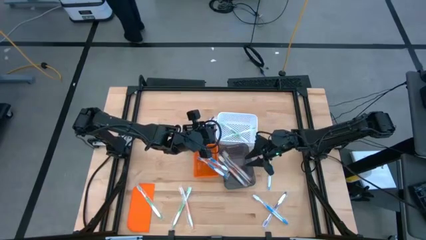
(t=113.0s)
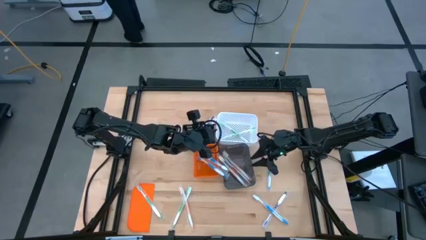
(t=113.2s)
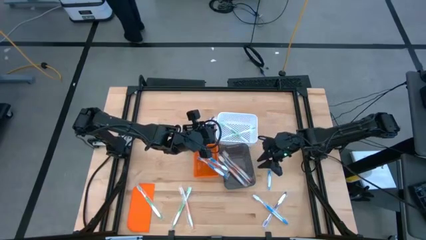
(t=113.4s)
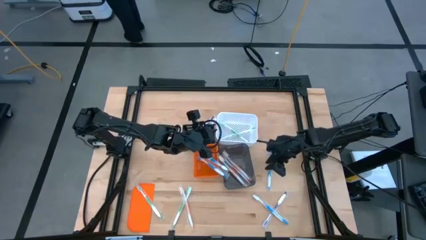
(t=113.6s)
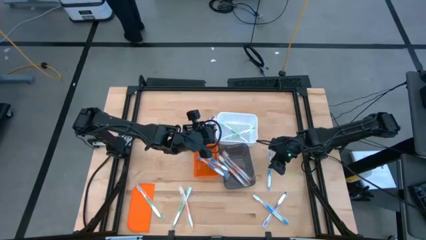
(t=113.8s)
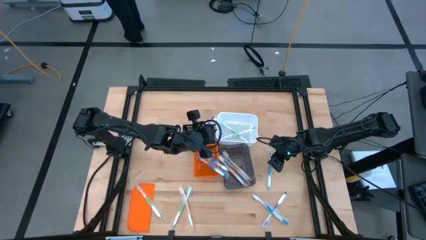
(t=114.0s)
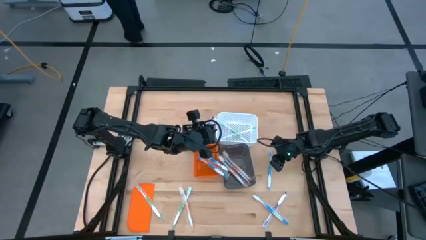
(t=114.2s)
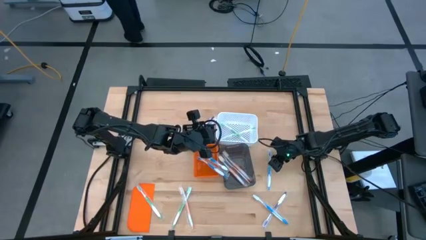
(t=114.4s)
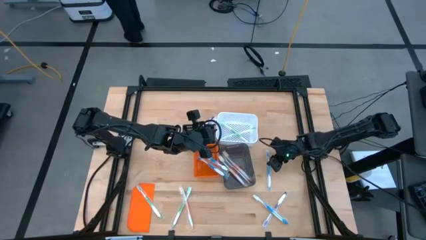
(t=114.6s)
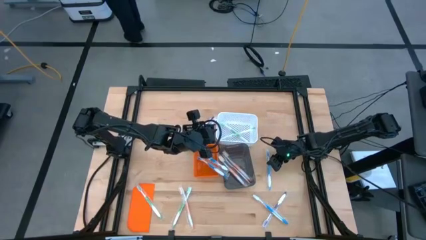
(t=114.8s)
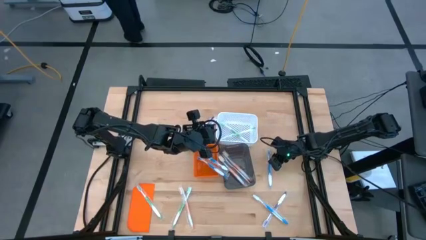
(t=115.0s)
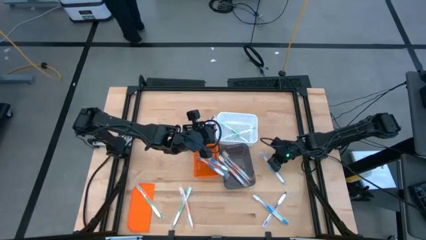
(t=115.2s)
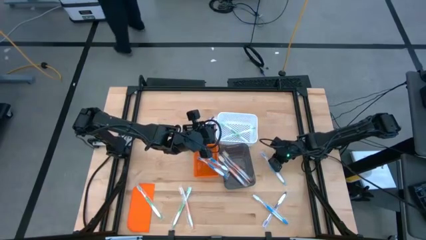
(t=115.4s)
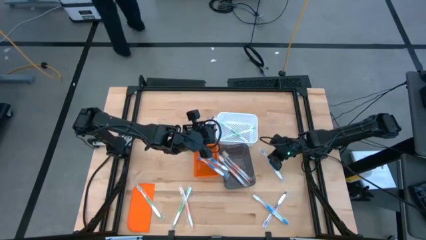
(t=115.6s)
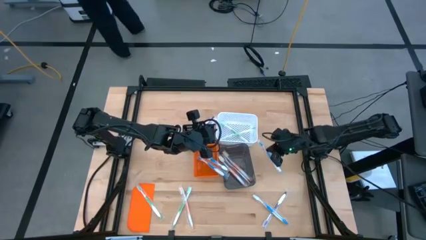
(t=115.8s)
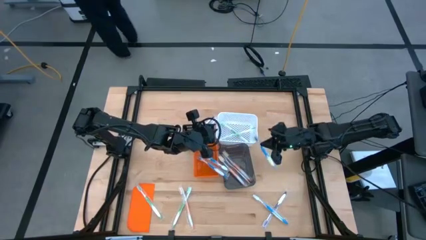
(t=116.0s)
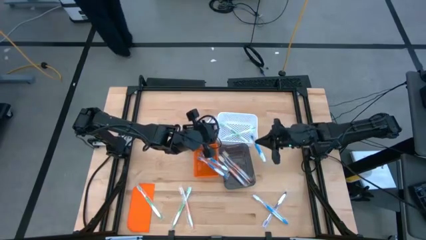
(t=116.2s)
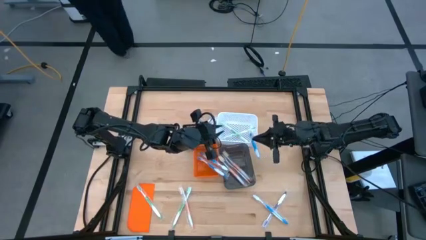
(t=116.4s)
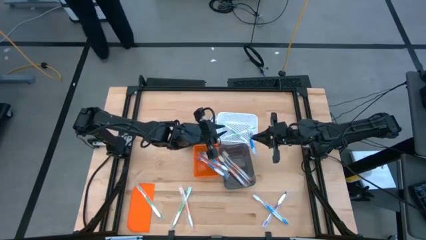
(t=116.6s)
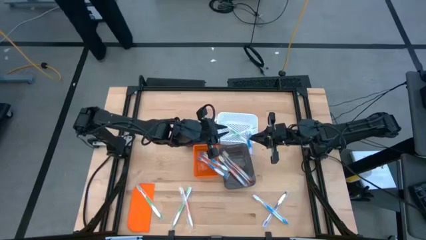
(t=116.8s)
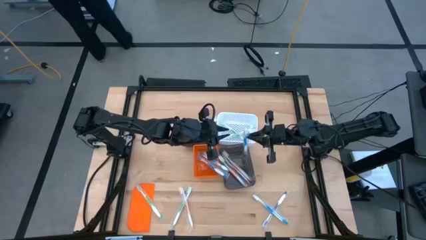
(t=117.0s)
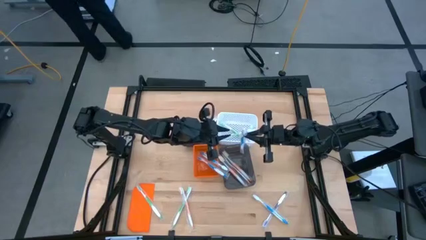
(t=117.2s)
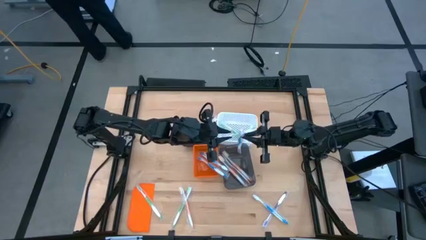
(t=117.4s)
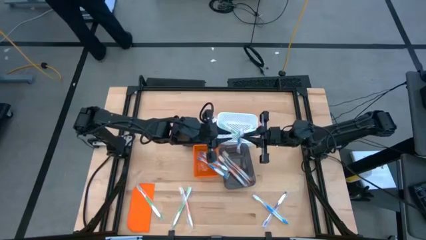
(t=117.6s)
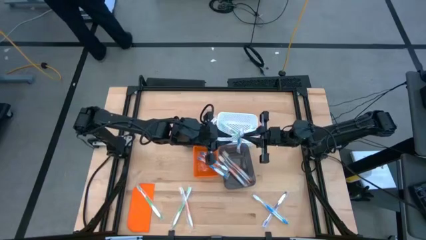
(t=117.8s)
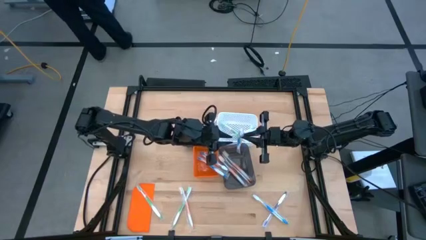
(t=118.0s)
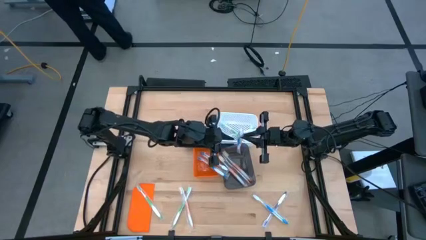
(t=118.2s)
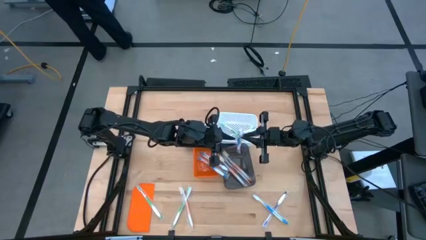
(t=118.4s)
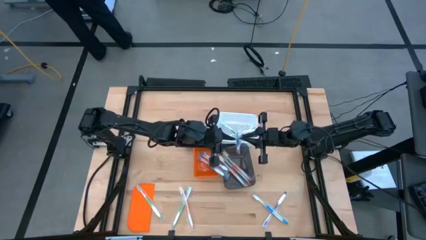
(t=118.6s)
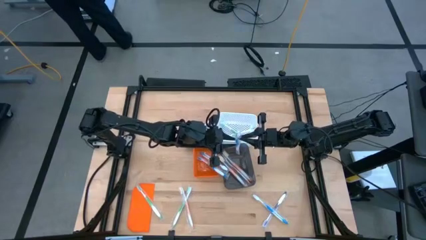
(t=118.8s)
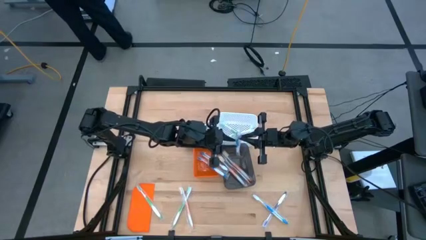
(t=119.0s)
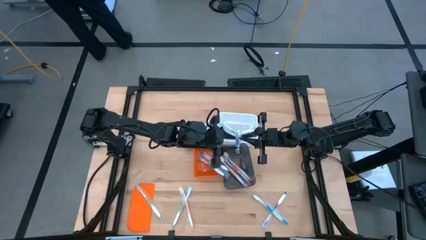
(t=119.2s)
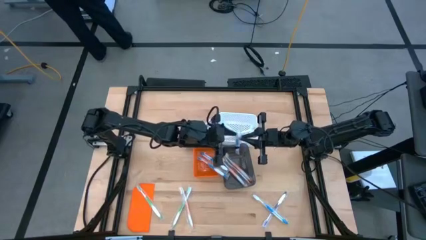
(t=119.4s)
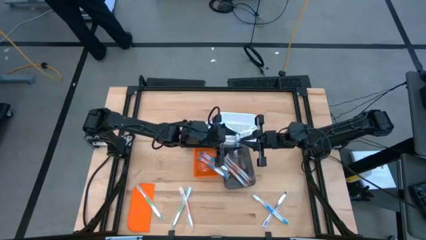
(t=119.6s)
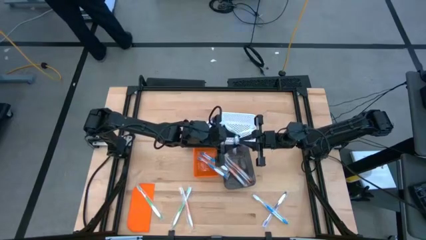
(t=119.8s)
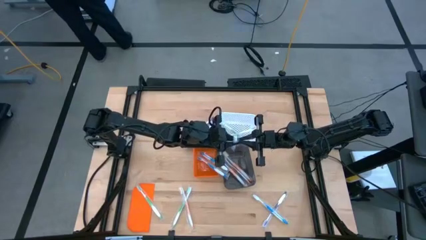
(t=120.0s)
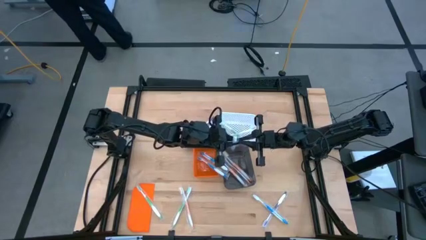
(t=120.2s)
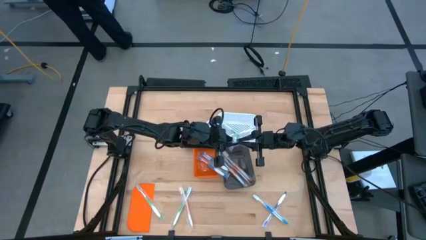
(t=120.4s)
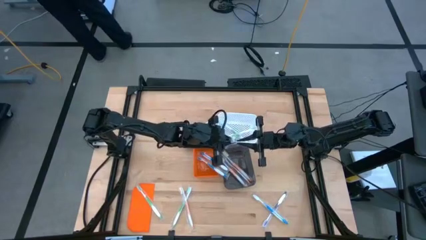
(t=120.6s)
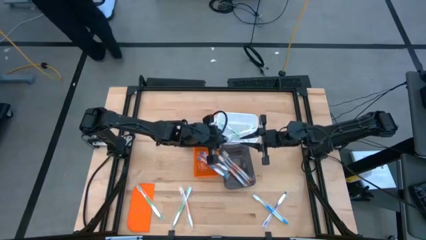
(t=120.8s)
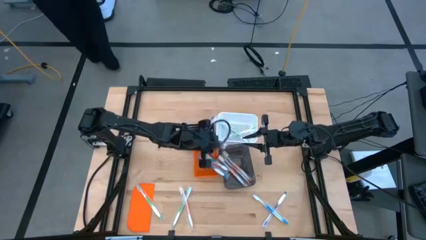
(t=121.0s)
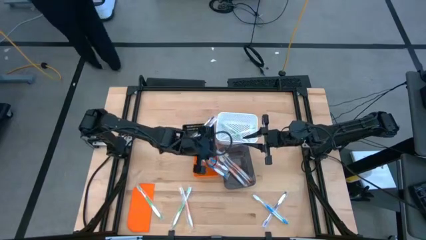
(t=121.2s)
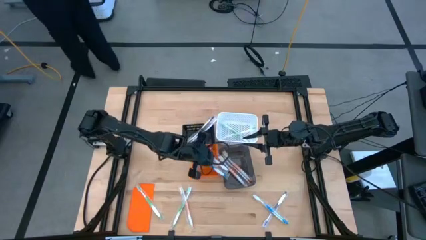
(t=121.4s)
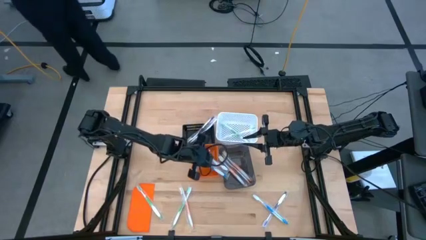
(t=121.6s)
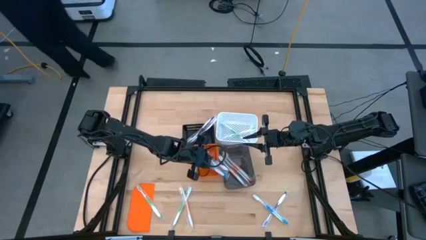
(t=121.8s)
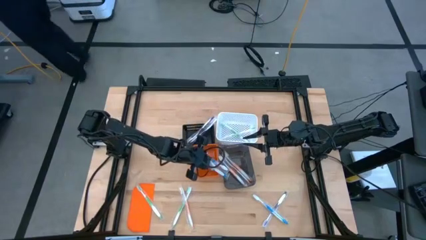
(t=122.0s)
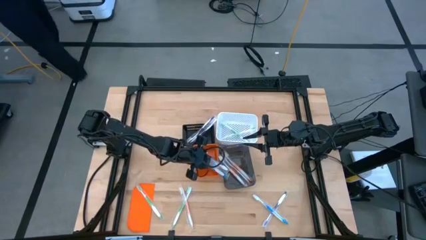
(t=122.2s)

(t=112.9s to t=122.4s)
Task: Pick & Place Toothbrushes
Put the blue toothbrush into the orange bin

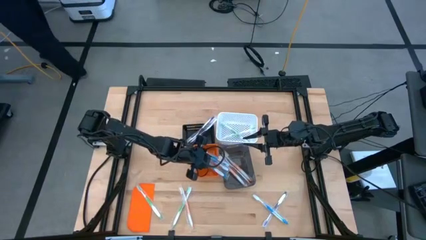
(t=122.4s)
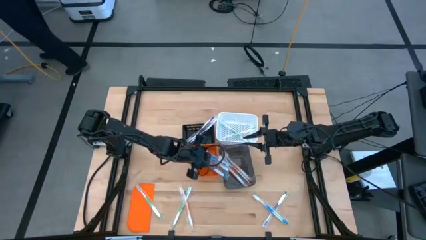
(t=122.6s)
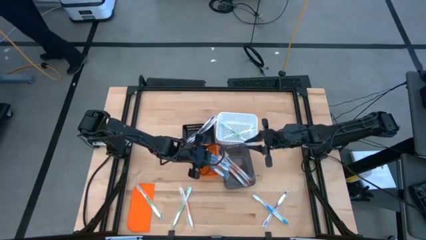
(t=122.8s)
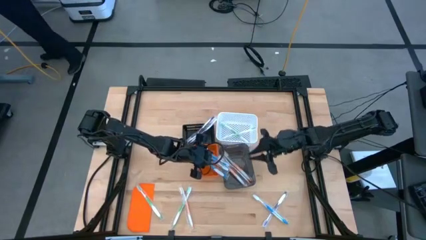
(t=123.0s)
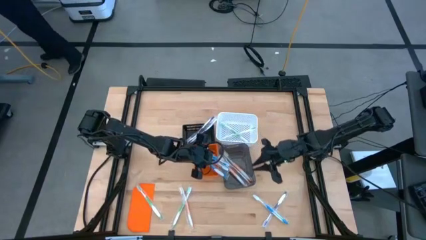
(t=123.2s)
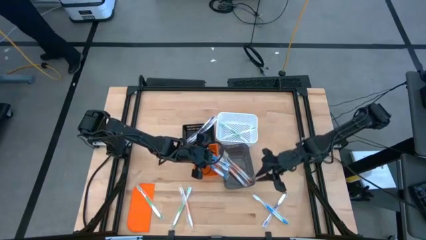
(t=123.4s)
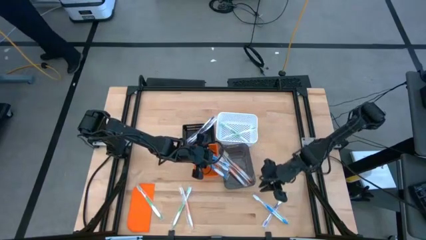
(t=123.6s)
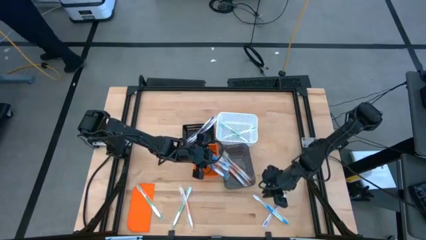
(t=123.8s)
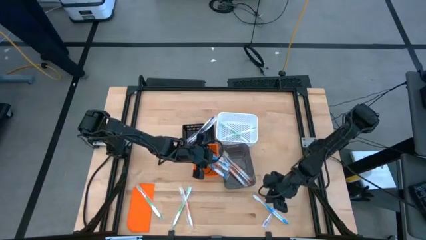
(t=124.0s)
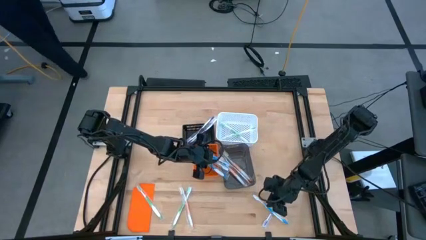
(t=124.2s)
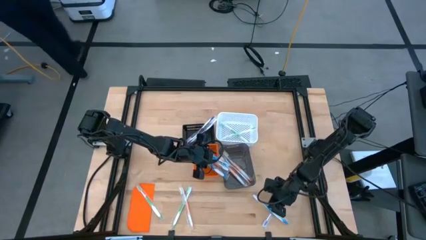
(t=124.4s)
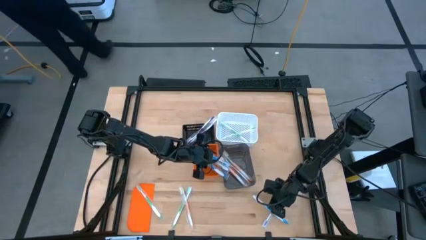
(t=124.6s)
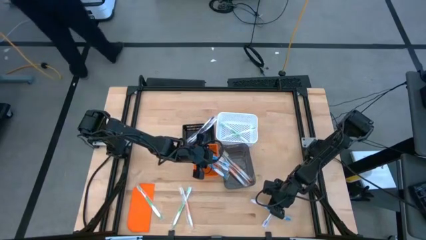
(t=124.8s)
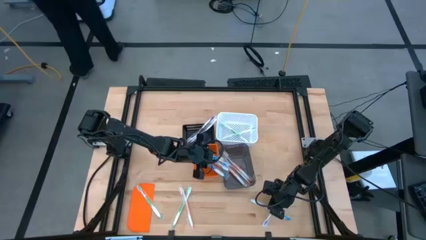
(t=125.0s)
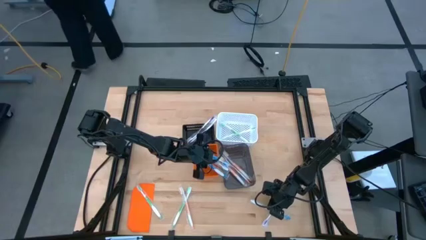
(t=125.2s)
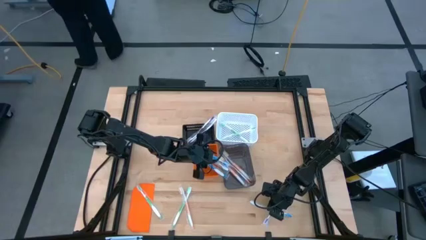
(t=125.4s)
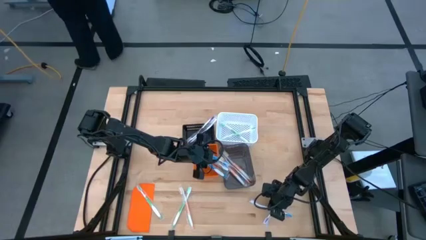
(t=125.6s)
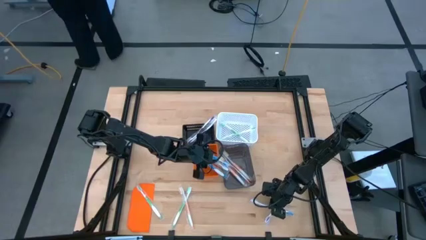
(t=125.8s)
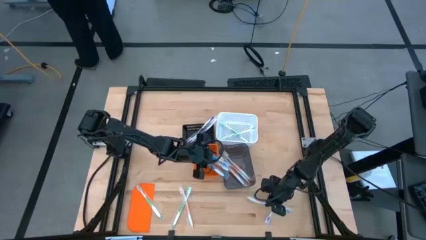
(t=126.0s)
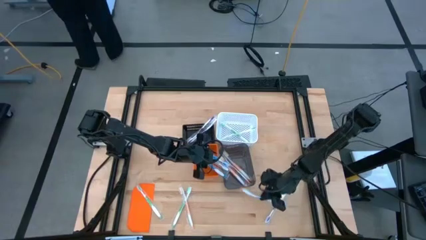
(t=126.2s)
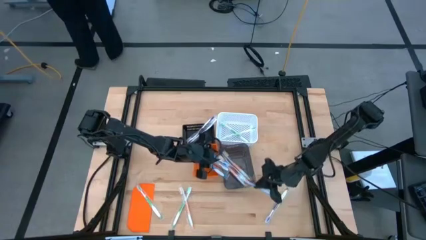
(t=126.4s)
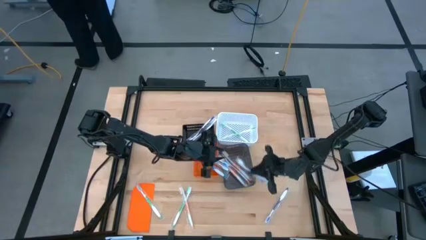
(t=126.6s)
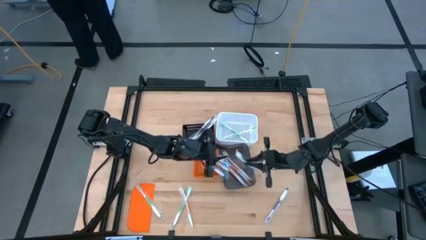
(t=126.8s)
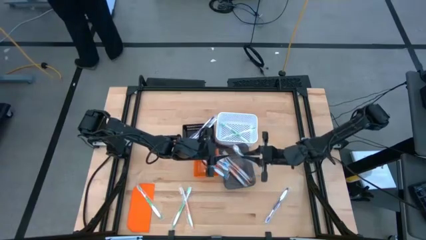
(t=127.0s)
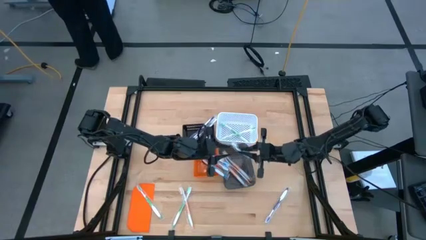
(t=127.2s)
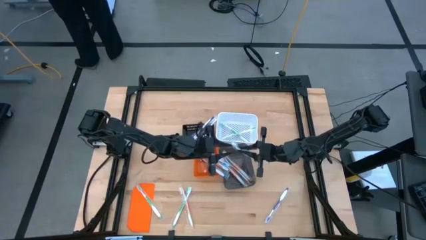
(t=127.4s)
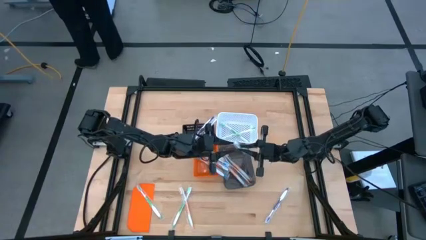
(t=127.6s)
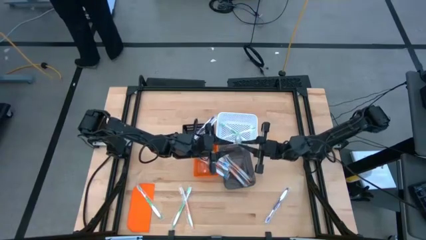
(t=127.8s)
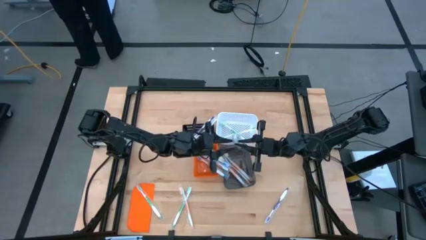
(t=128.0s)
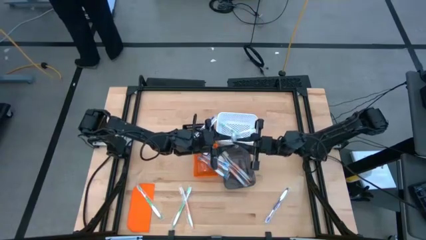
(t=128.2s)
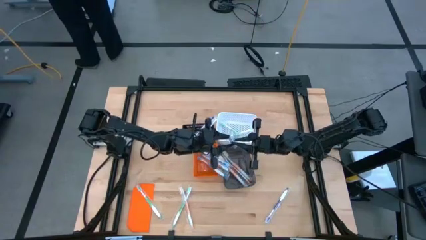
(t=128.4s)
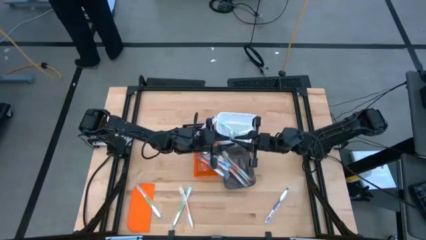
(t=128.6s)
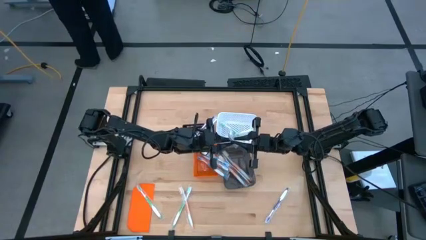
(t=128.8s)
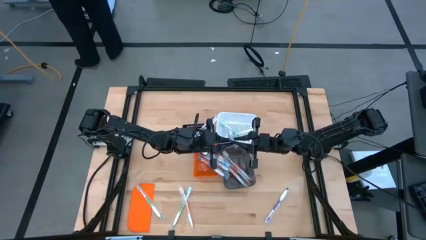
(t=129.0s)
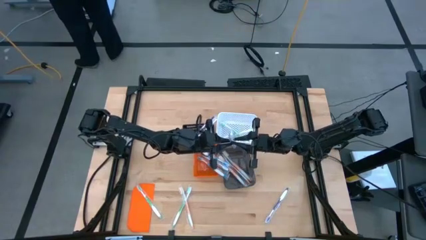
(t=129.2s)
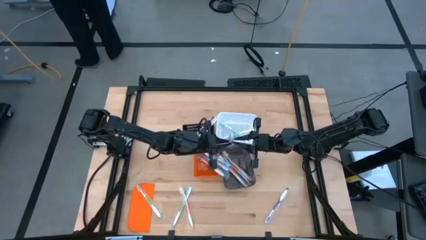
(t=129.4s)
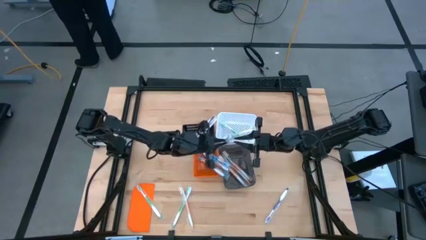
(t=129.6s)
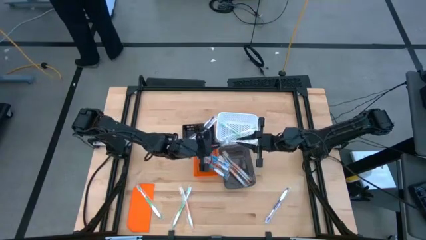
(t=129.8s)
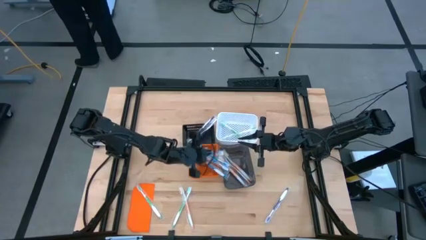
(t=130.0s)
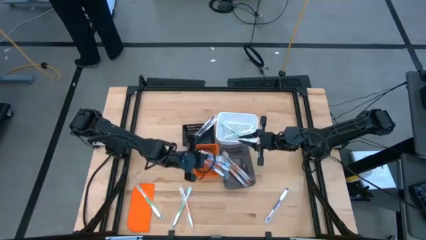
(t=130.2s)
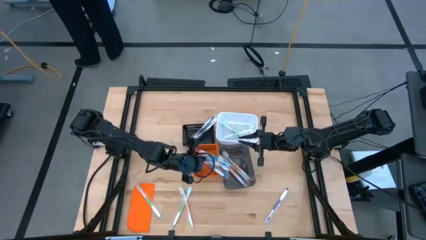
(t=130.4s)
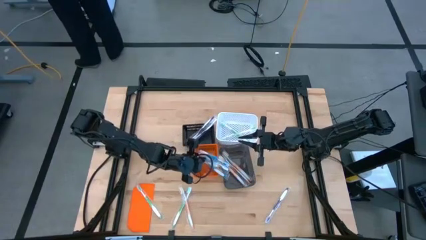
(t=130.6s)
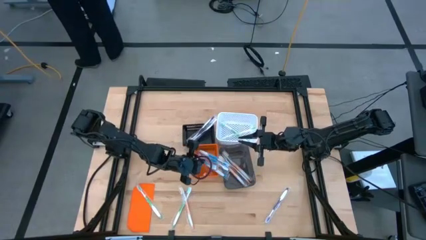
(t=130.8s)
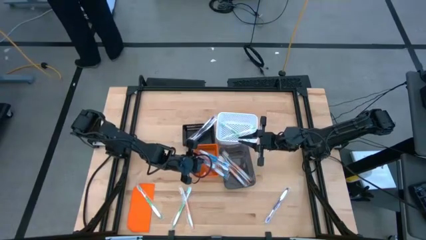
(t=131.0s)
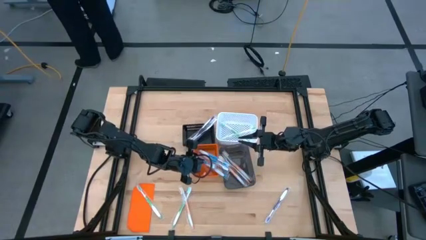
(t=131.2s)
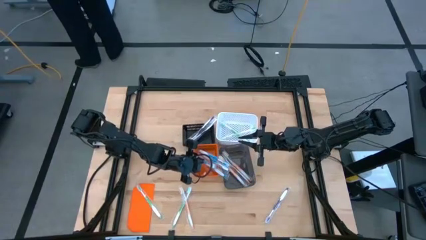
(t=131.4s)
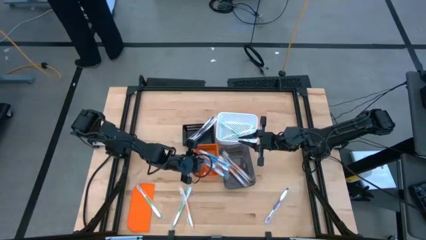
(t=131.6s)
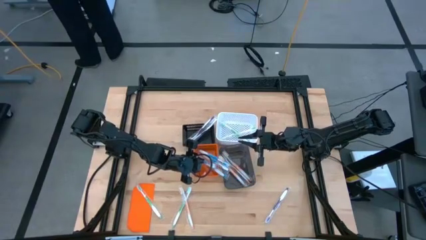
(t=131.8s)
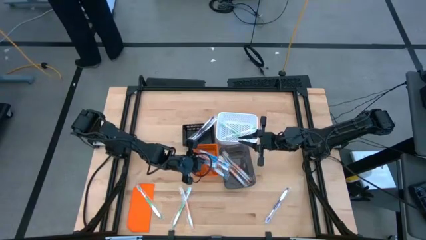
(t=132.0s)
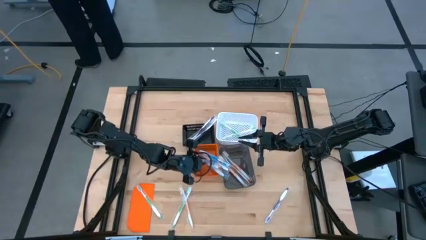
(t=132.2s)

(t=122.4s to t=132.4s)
Put the blue toothbrush into the orange bin
